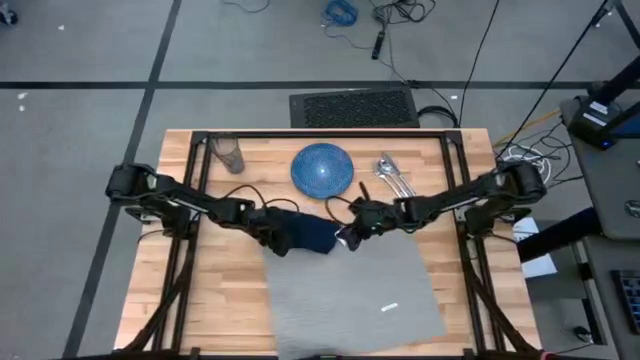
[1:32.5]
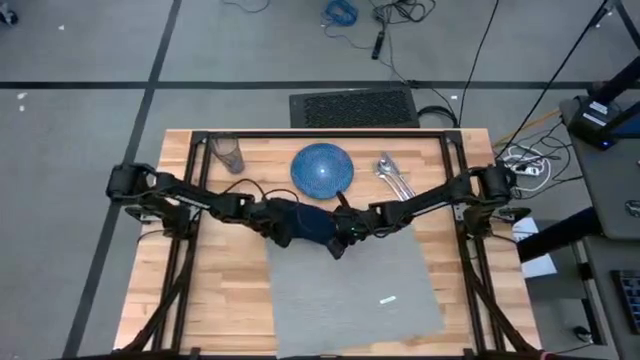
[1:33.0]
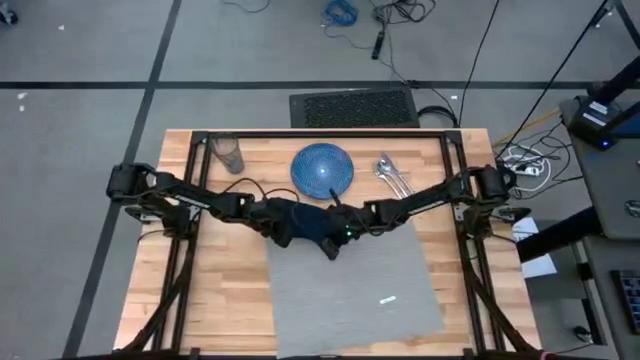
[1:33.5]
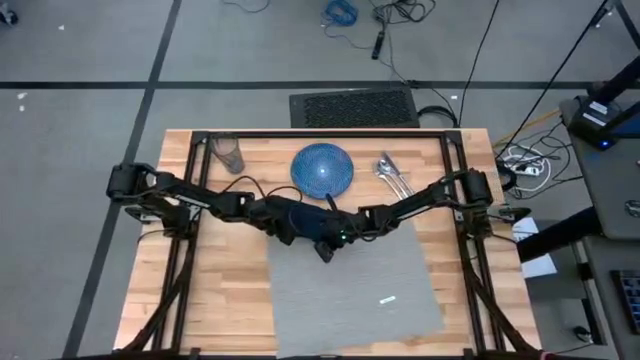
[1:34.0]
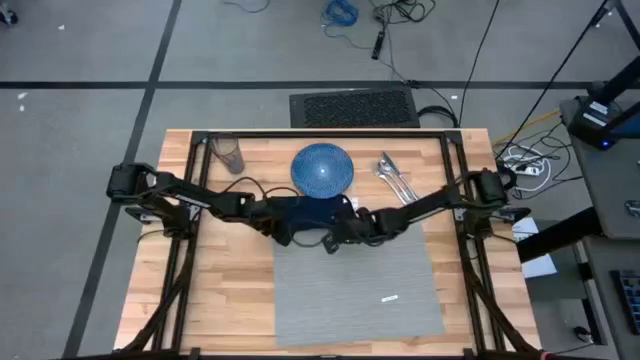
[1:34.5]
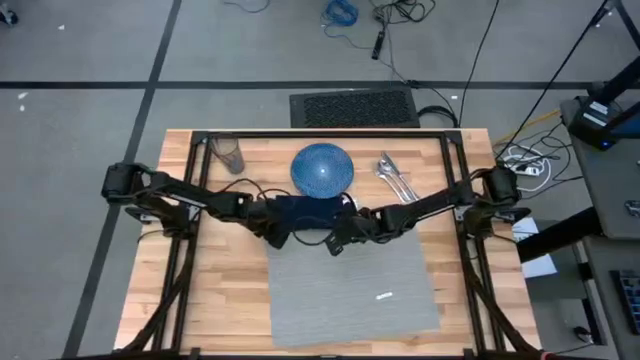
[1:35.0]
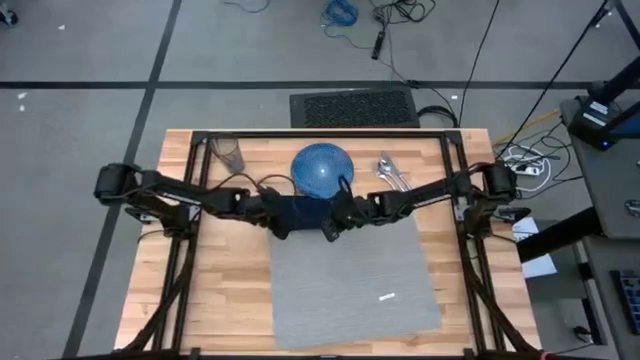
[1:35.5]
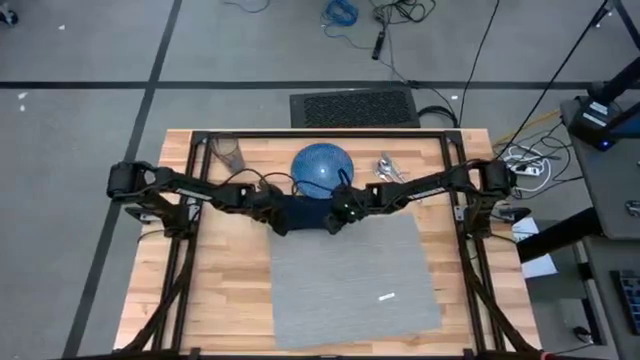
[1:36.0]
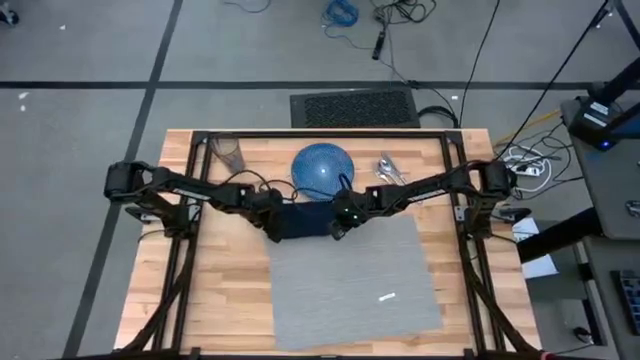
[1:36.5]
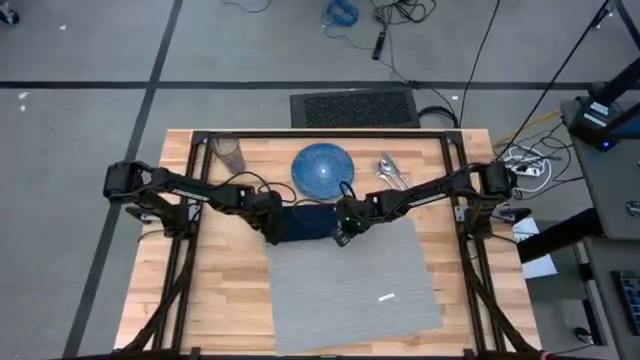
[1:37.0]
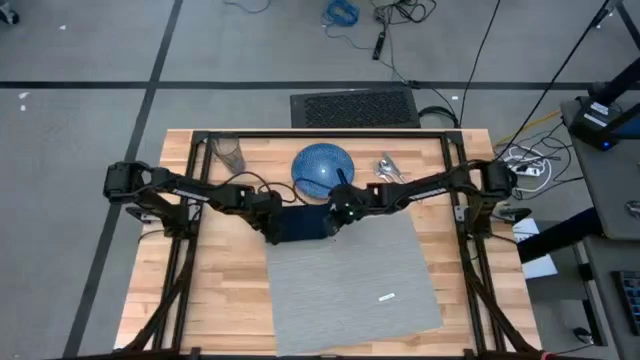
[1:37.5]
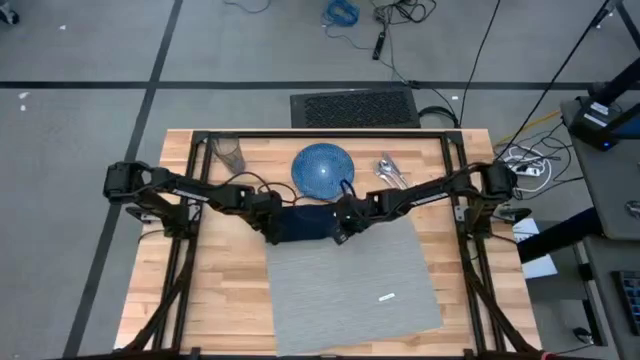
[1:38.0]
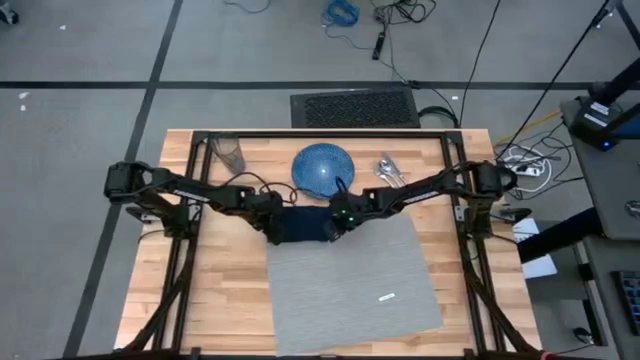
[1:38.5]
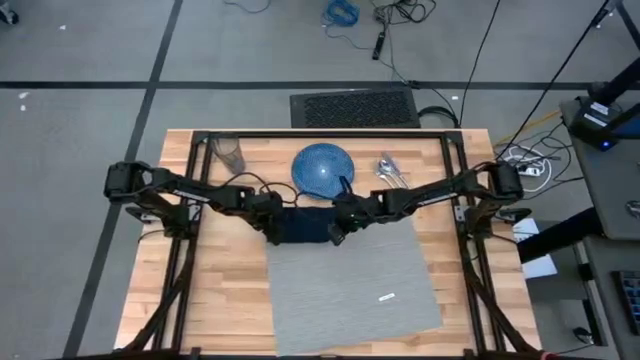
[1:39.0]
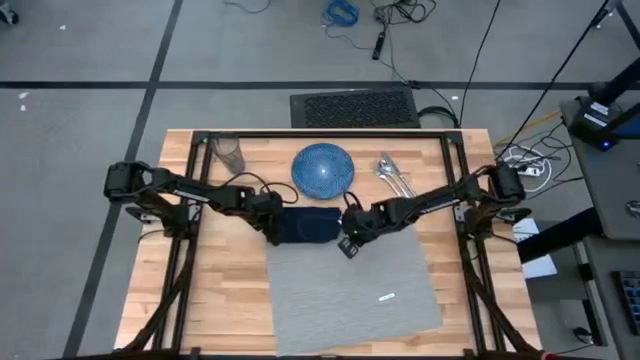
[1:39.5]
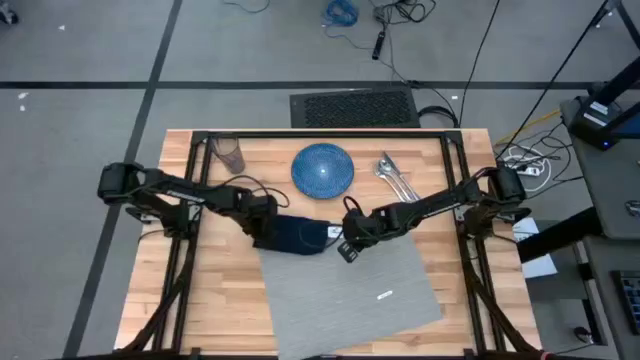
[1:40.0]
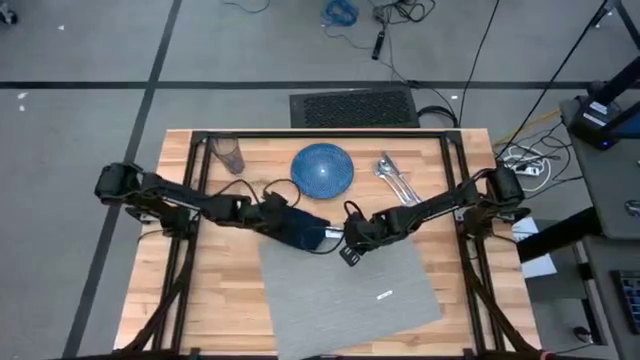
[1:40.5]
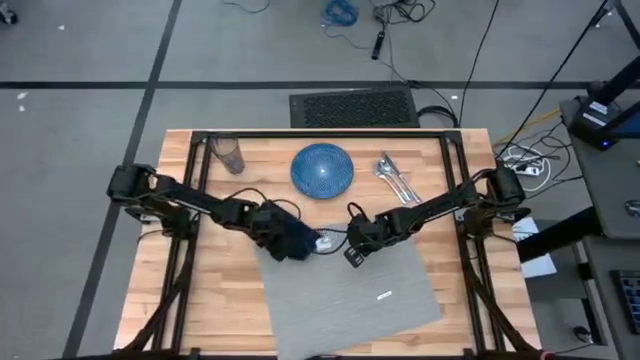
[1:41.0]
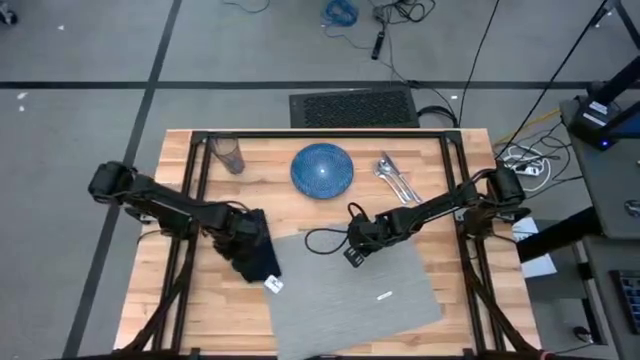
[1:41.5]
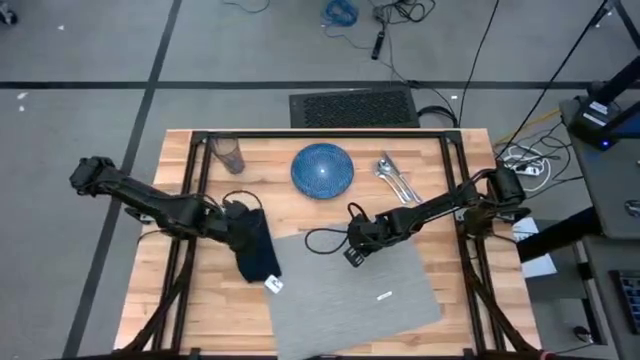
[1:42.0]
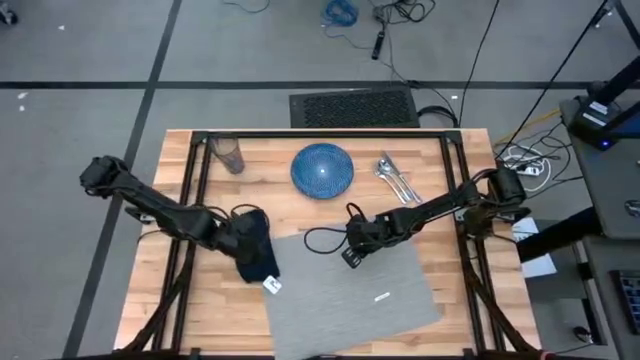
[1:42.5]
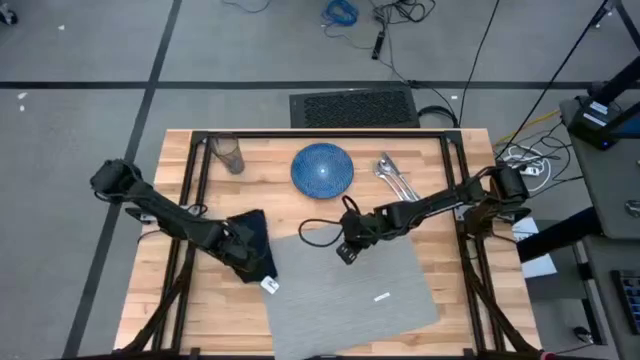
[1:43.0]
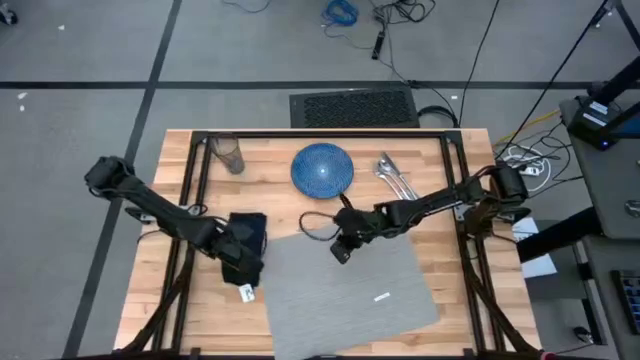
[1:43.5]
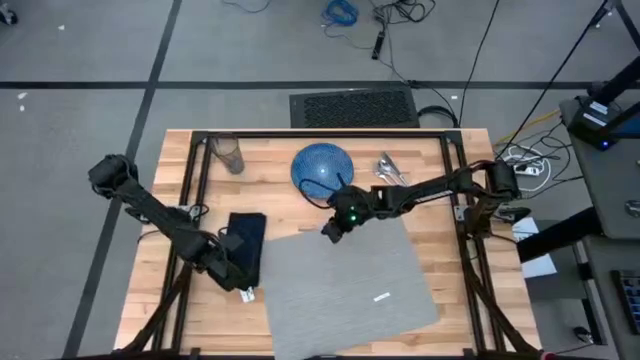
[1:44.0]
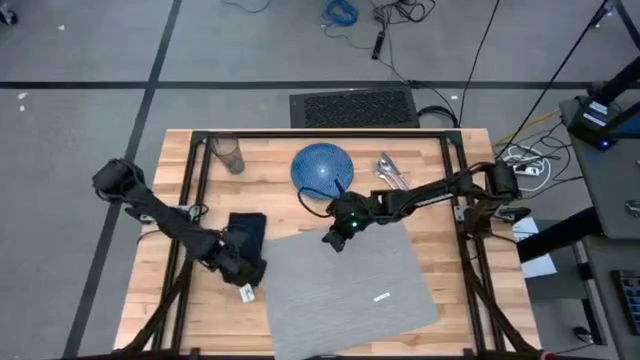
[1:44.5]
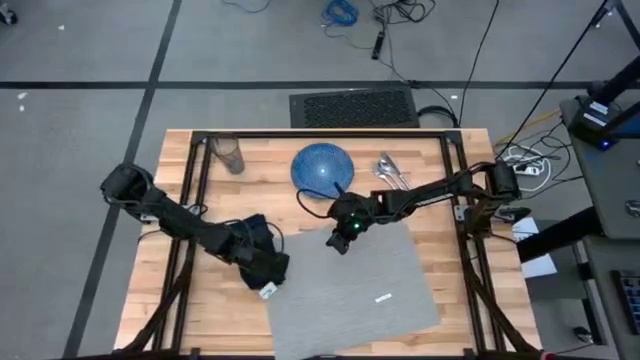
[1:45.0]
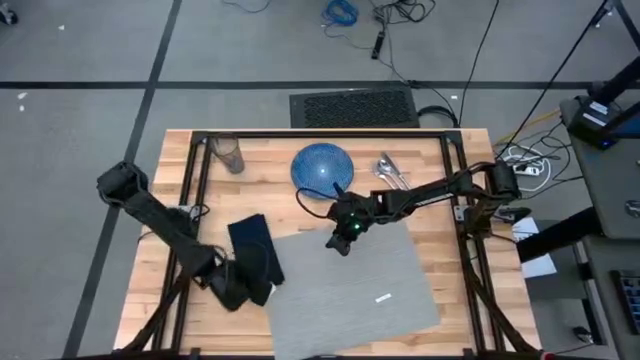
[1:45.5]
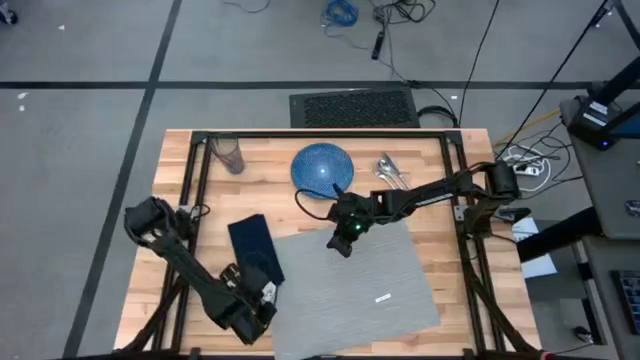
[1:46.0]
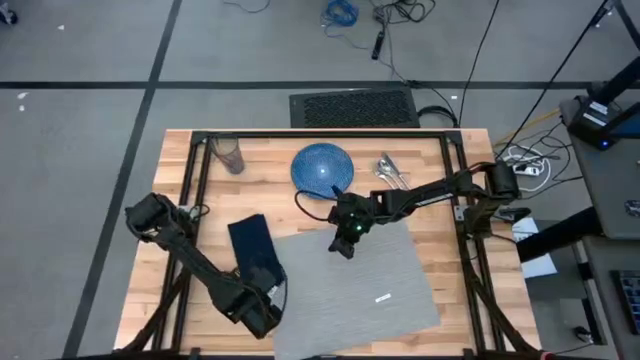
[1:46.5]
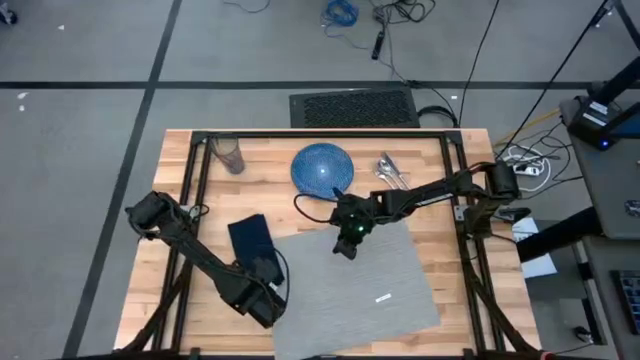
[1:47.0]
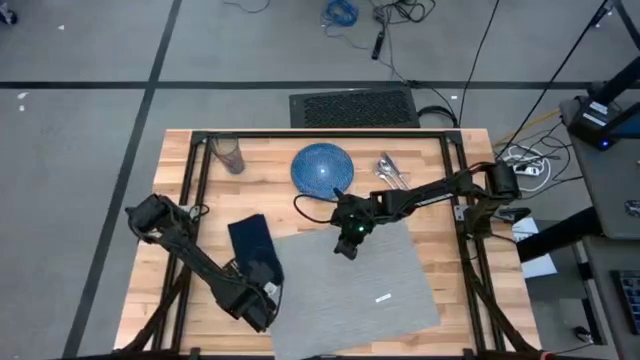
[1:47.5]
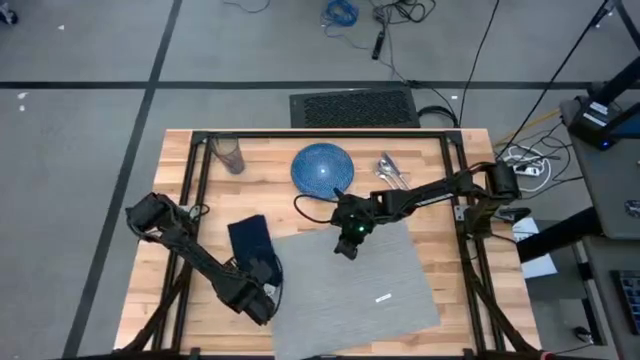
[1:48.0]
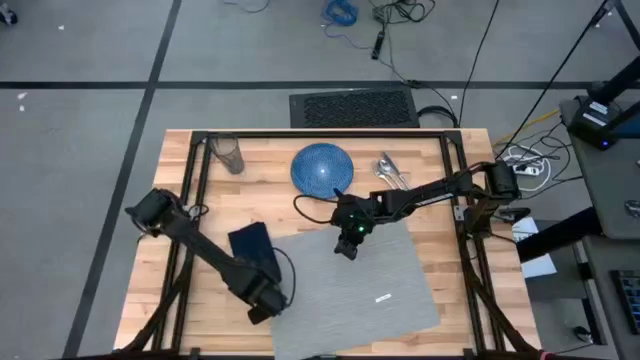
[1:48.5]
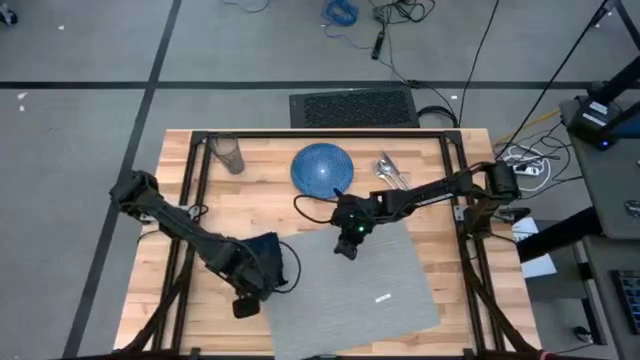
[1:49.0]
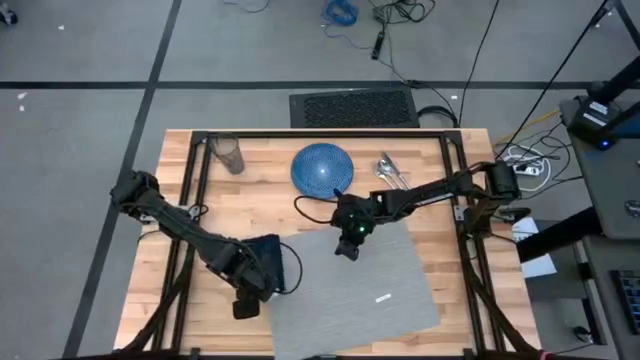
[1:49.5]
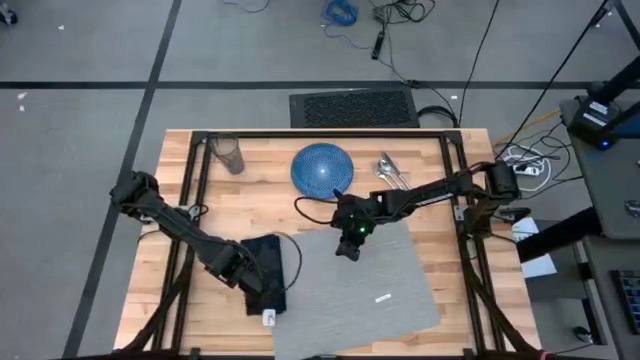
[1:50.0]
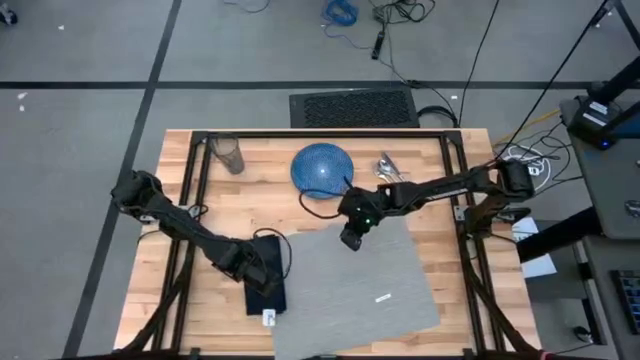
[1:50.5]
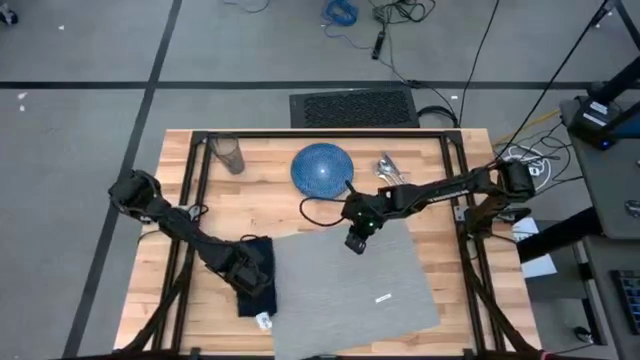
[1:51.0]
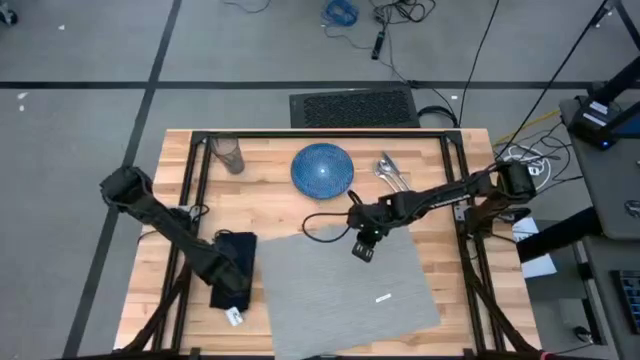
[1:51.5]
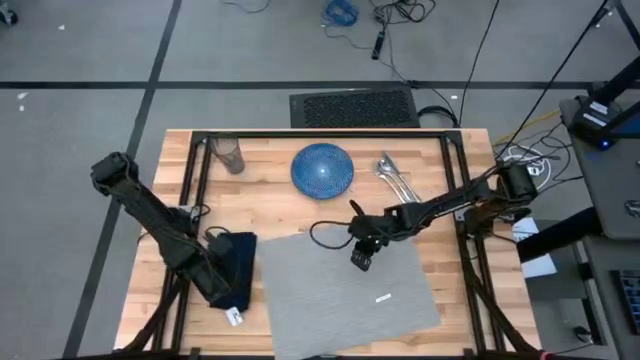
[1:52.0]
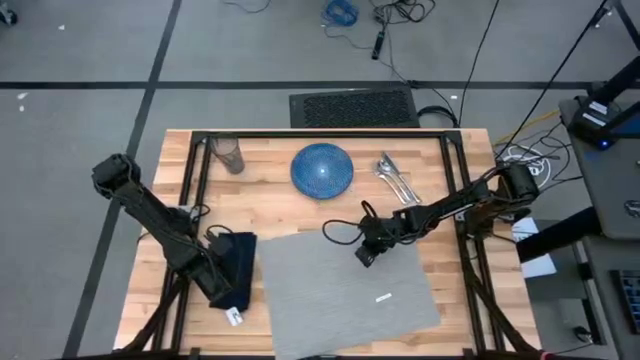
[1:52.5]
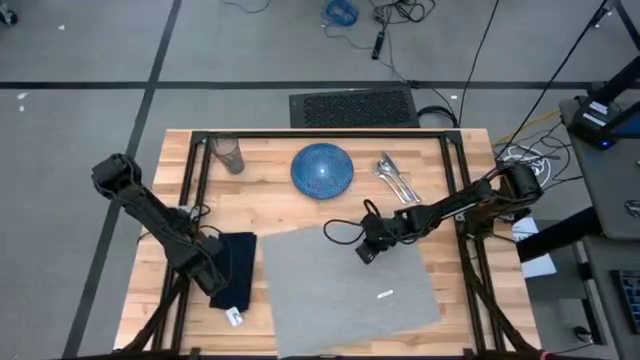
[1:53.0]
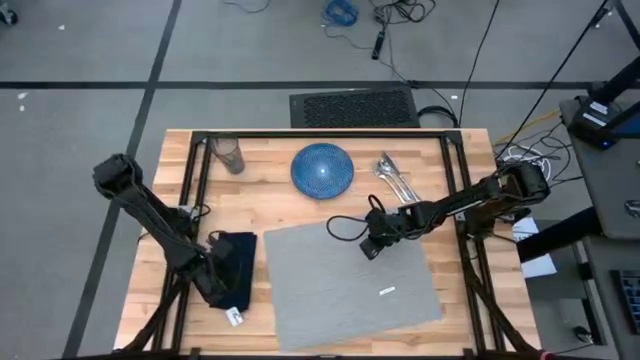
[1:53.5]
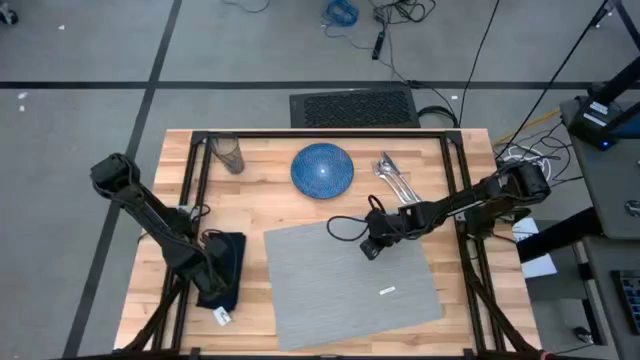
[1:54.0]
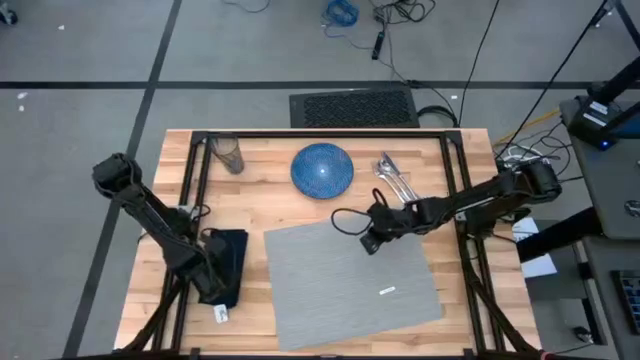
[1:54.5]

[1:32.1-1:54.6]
Task: Set table place
Fold the blue table napkin
